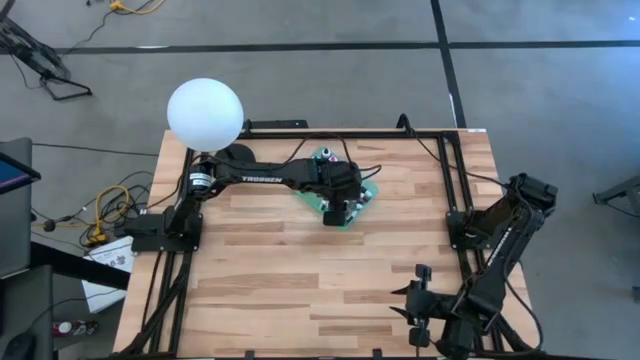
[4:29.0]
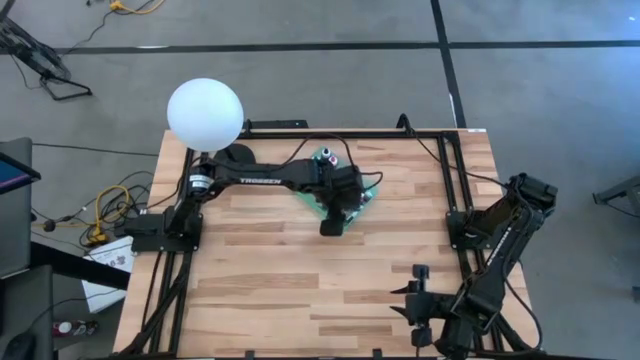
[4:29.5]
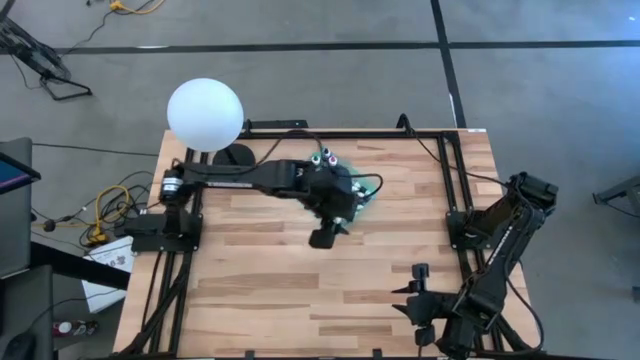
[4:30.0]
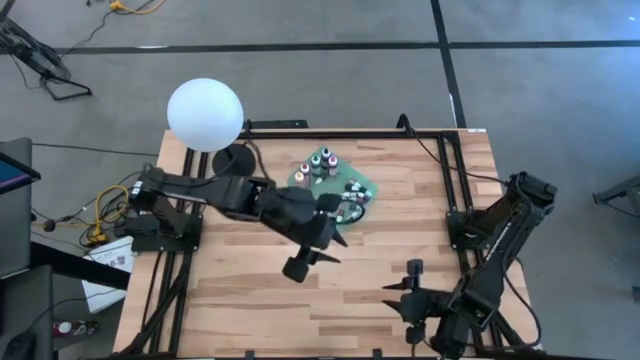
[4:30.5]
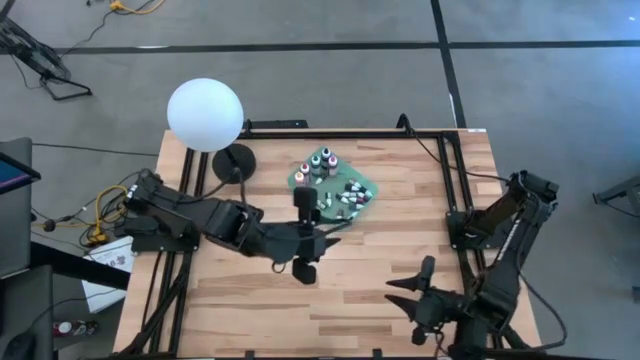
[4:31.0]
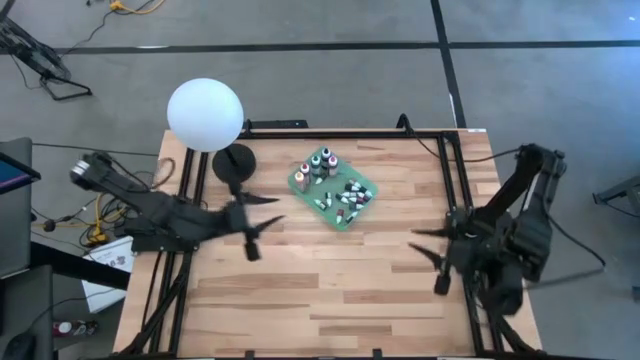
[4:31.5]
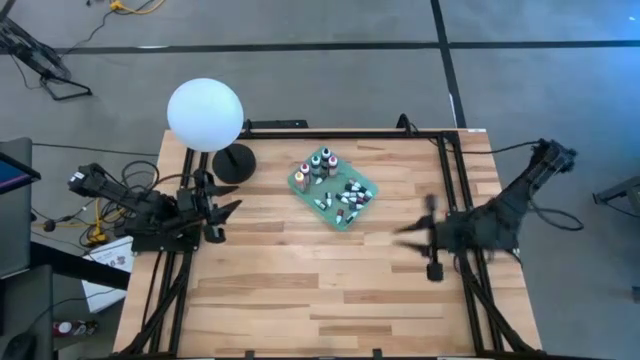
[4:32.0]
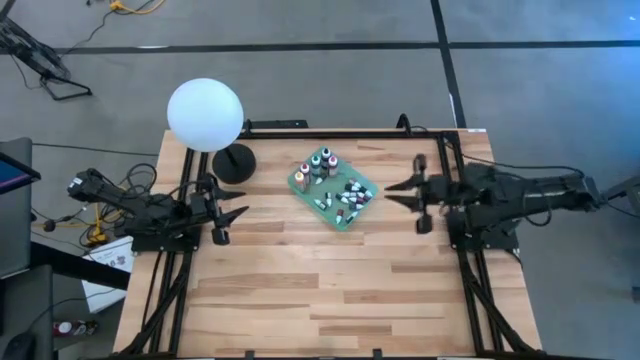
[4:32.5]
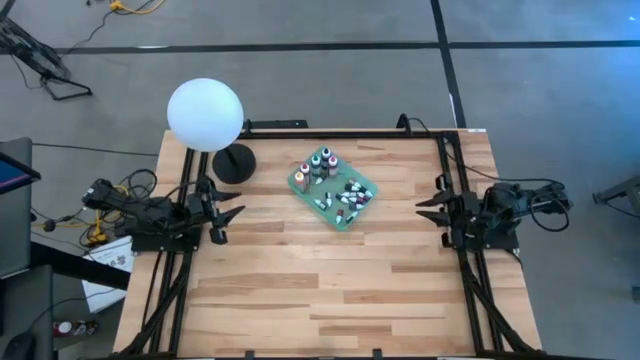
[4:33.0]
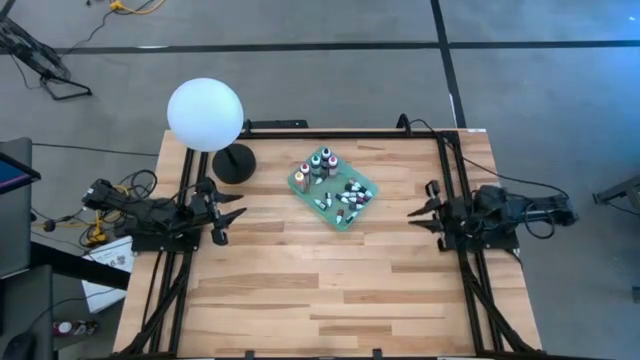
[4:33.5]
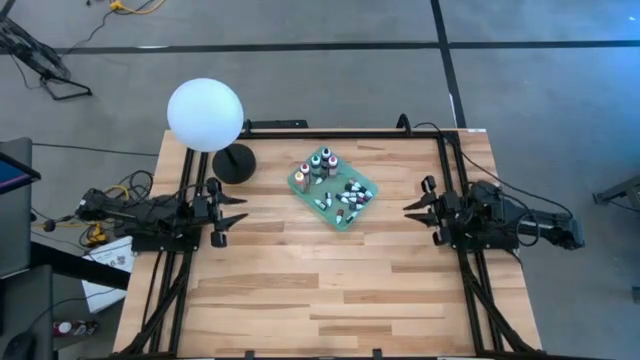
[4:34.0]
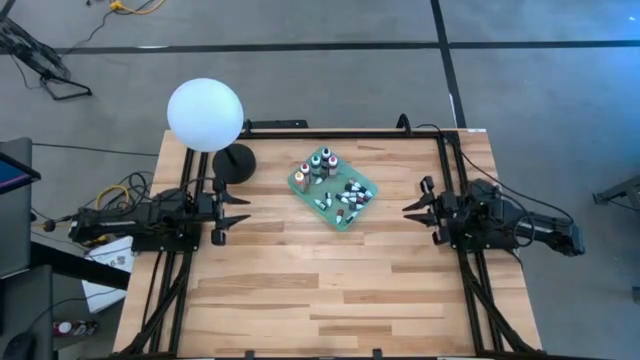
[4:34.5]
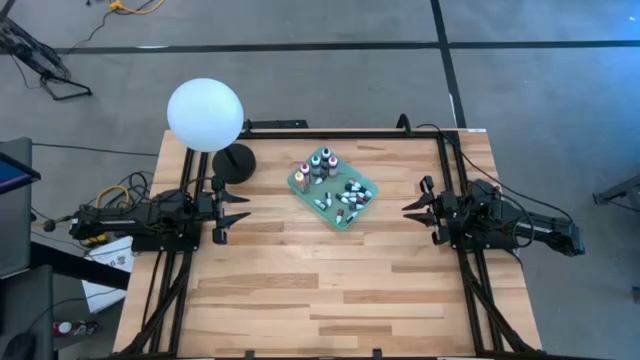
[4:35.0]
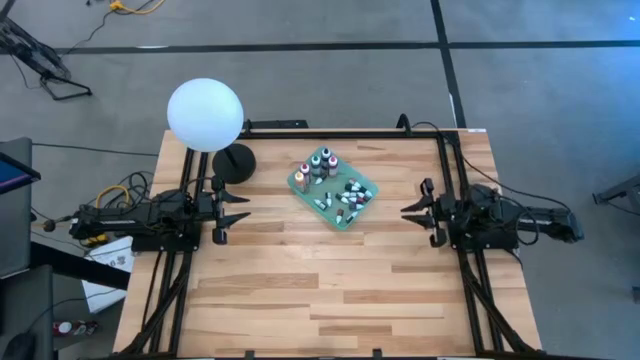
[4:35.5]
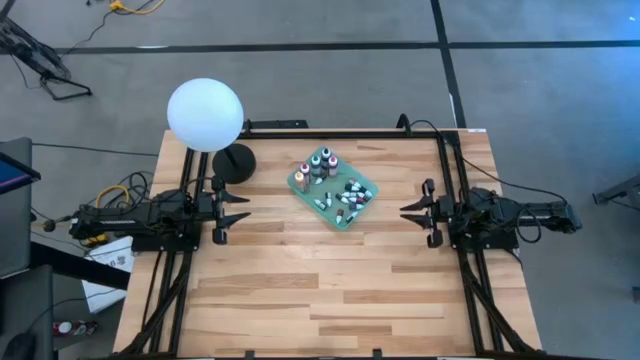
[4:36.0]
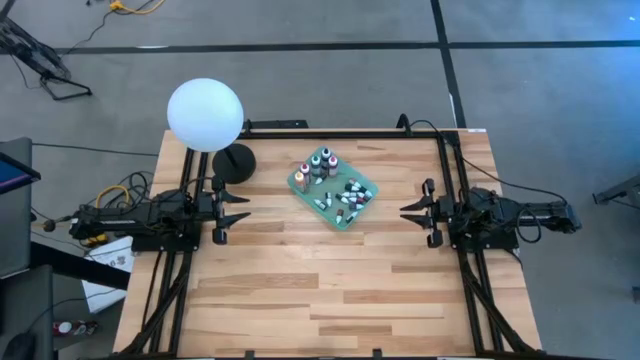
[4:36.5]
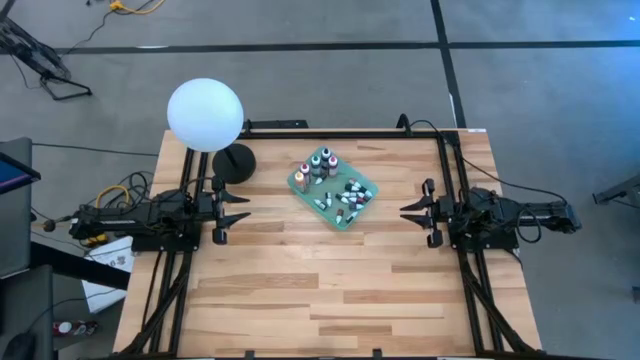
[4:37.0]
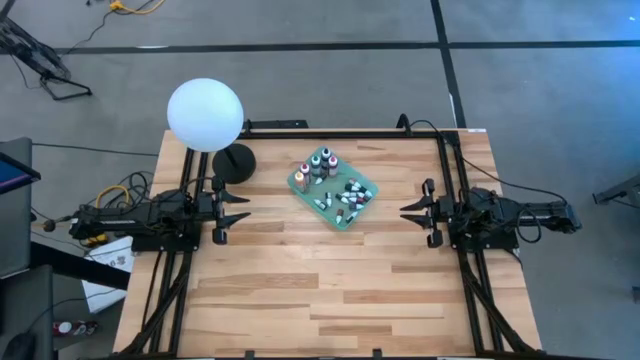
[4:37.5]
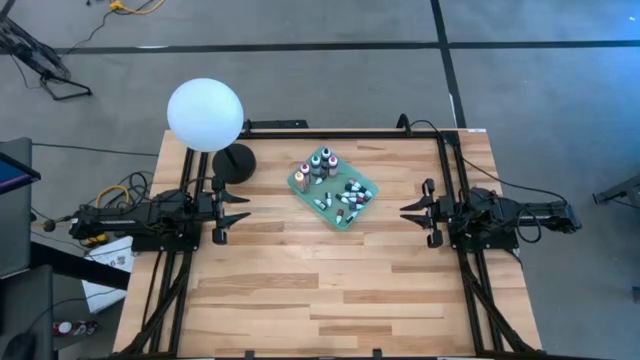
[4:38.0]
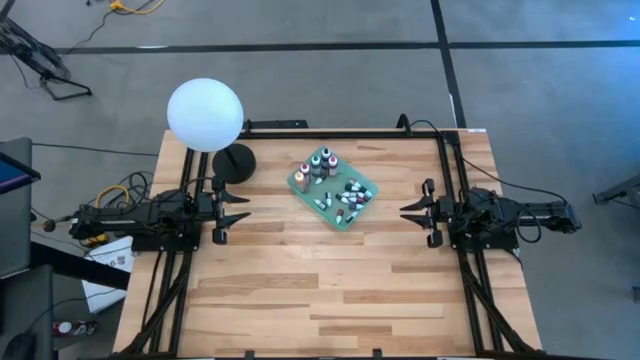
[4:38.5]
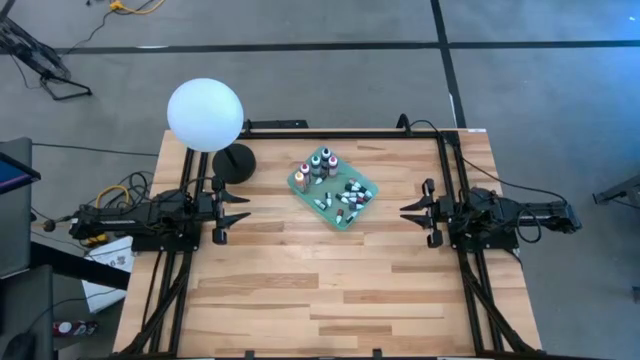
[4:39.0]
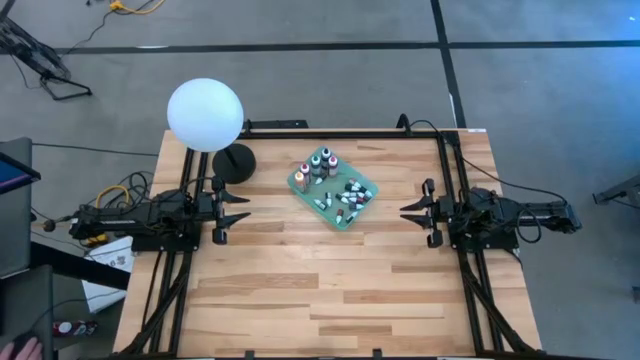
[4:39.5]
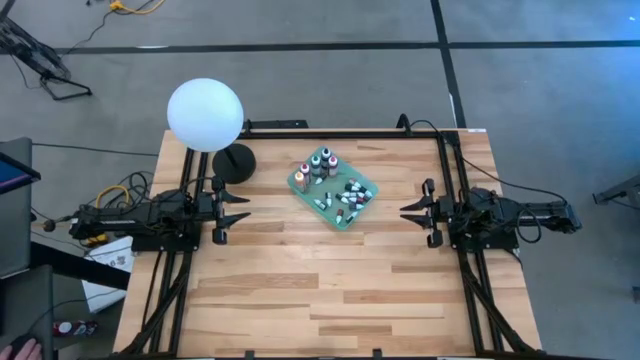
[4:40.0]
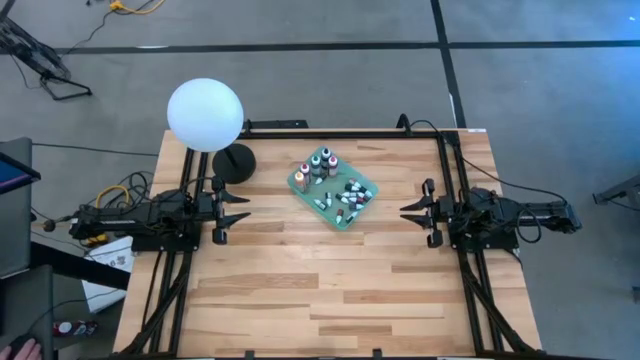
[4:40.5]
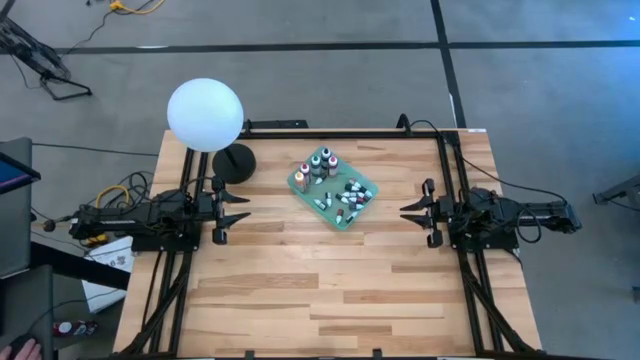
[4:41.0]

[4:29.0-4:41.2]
Task: Pick & Place food coloring
Return to Home Position

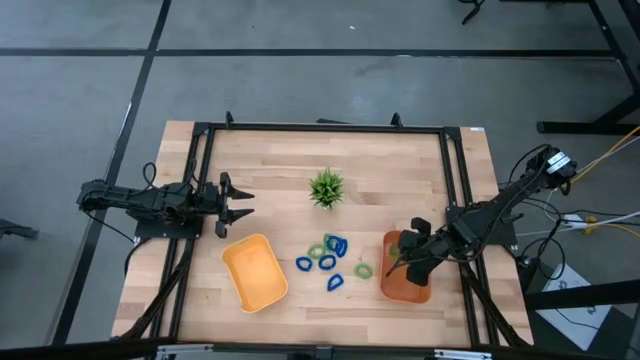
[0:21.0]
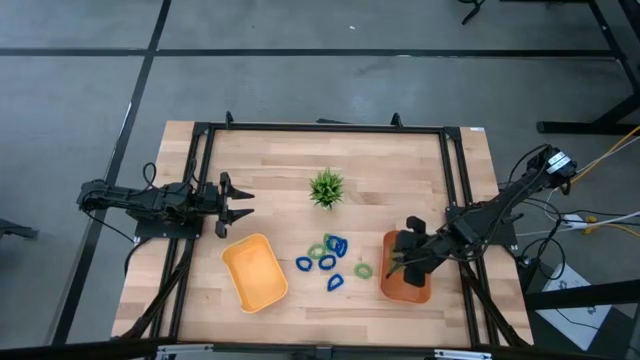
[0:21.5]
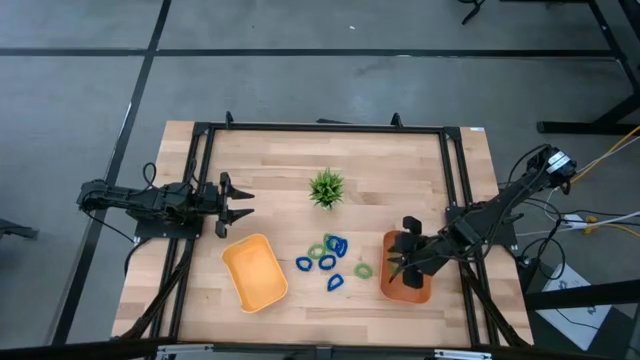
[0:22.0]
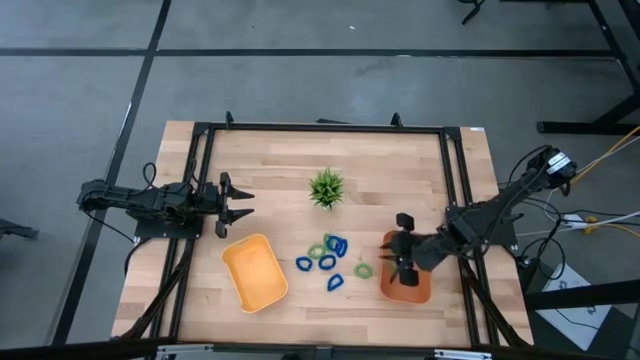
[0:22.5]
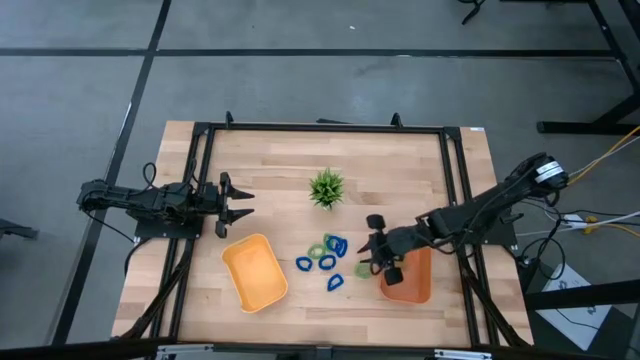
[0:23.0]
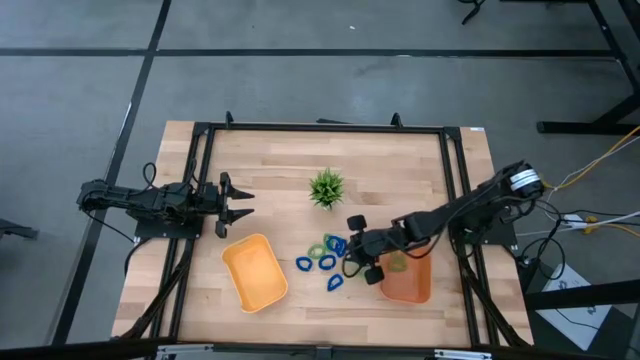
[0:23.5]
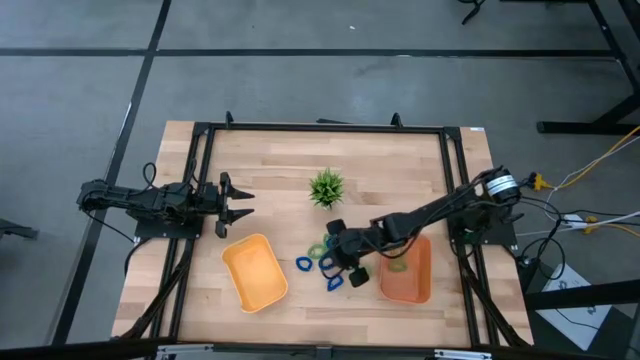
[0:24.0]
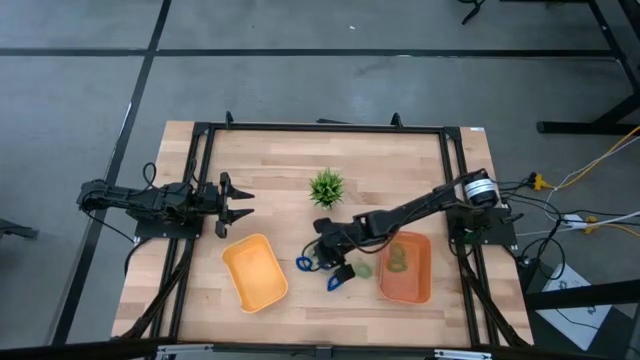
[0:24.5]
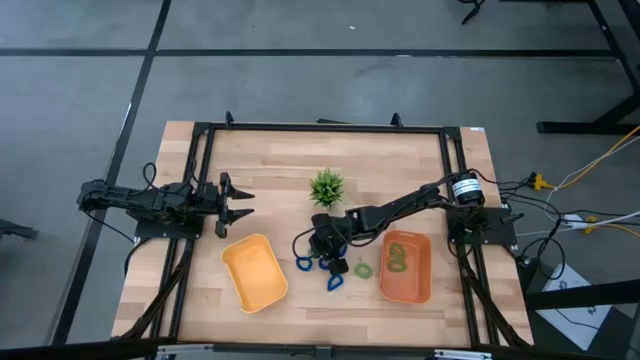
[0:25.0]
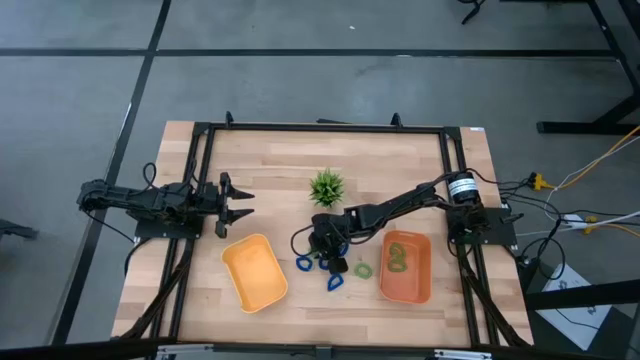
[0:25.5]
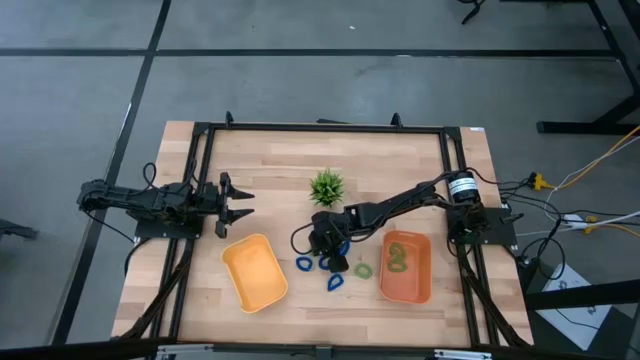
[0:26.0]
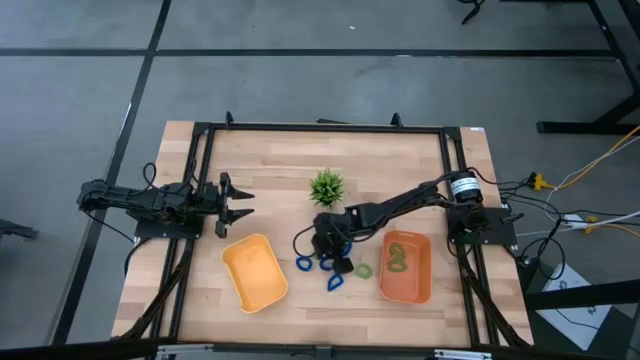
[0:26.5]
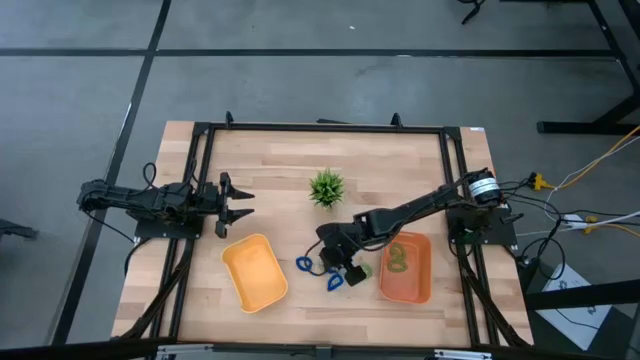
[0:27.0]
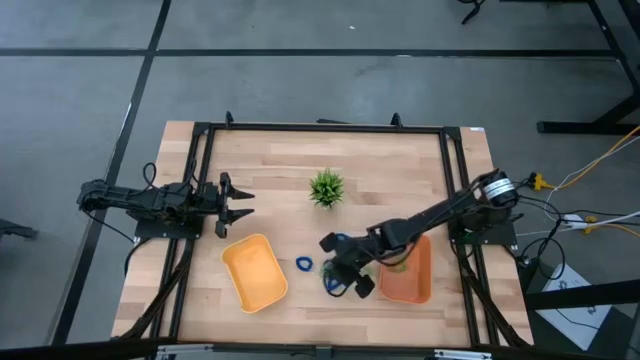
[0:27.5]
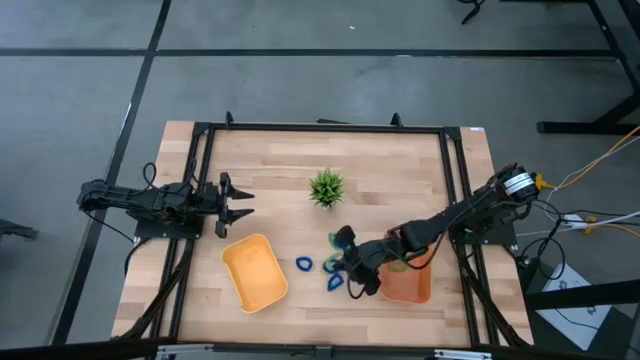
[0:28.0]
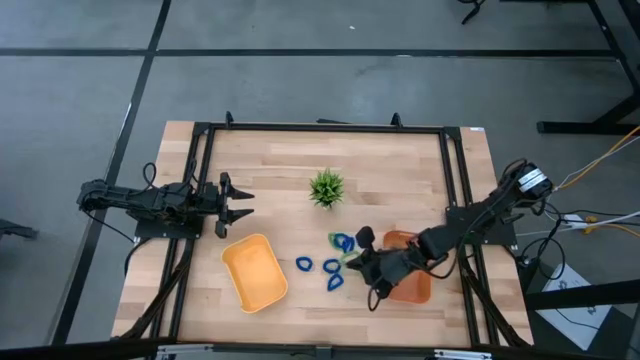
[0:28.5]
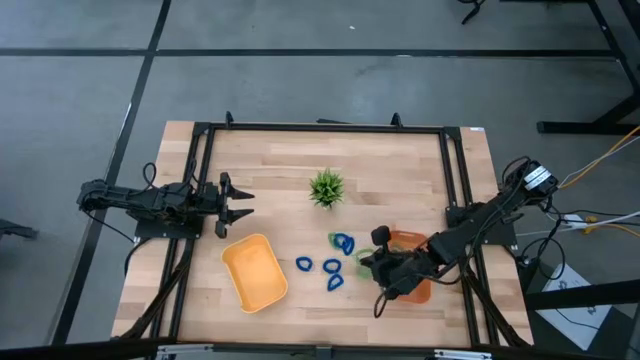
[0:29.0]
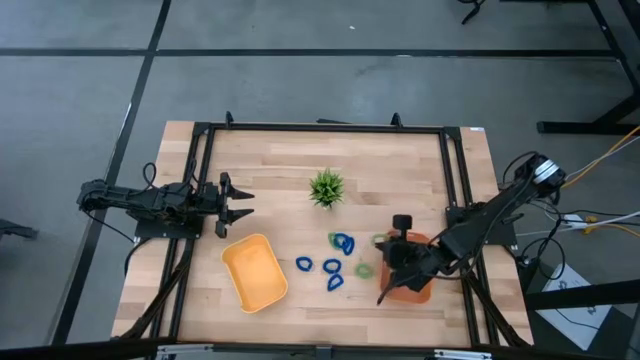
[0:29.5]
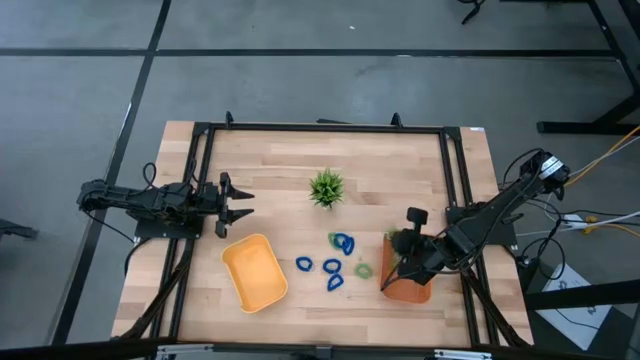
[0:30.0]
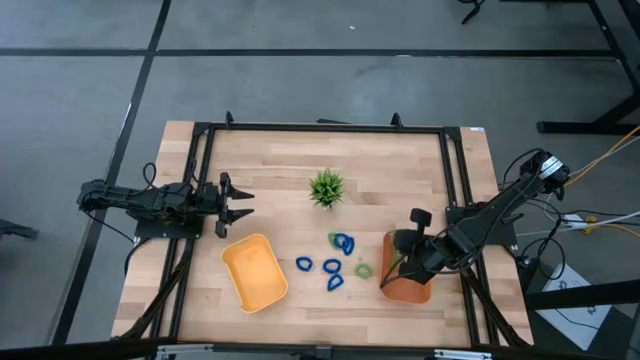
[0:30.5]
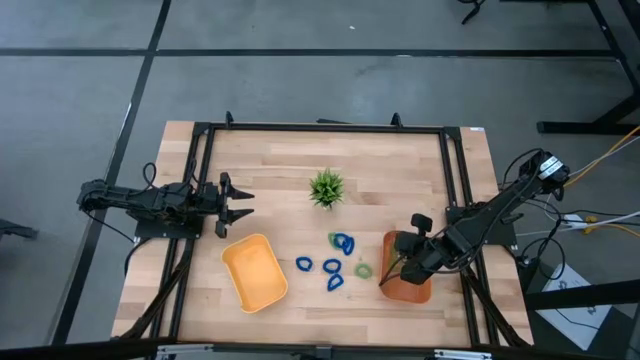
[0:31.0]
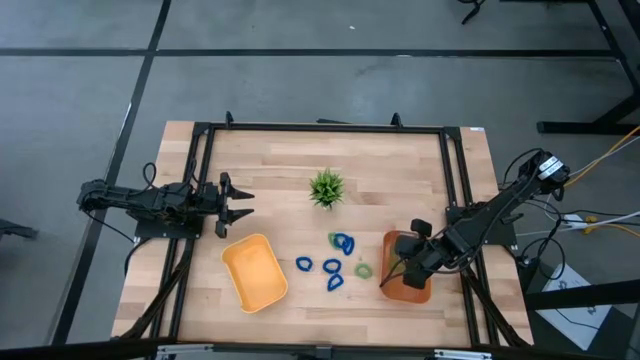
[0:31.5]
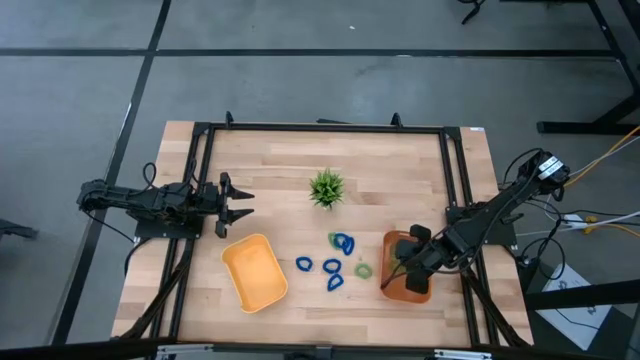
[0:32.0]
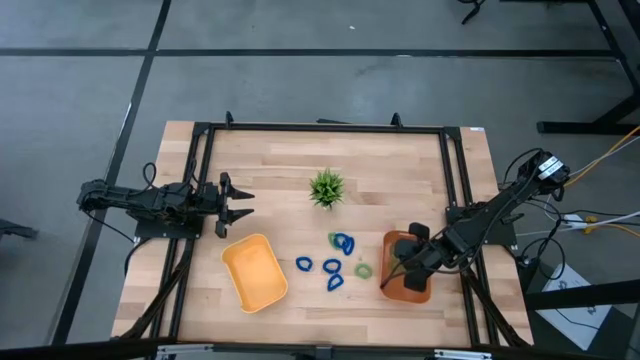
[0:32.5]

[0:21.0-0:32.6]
Task: Sort spring keychains
Put the green spring keychain into the orange bin
